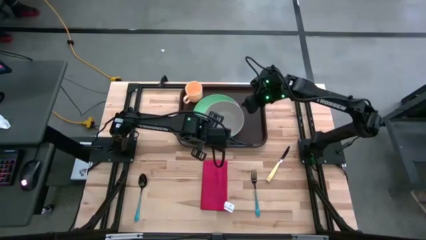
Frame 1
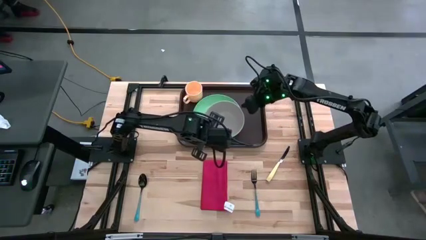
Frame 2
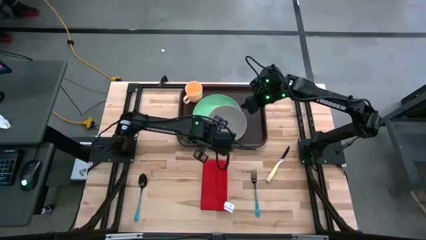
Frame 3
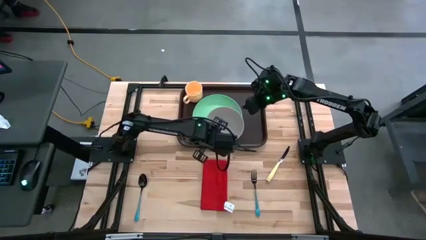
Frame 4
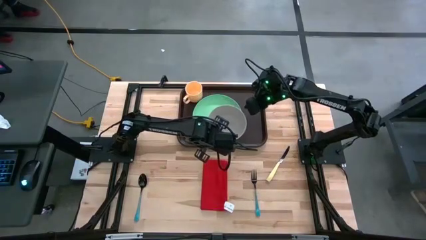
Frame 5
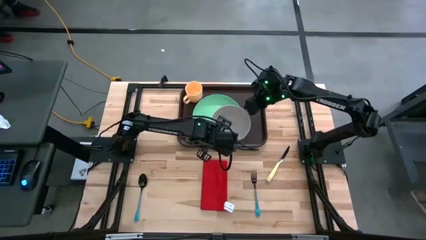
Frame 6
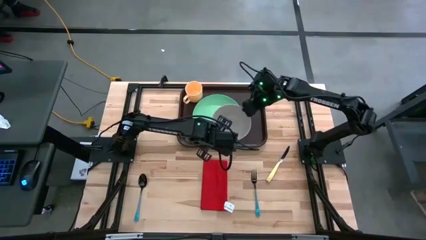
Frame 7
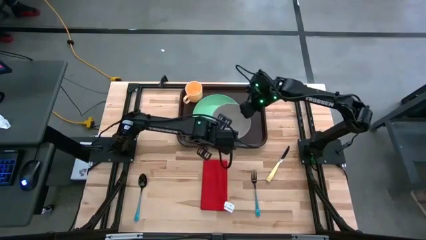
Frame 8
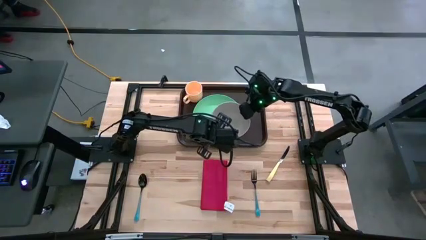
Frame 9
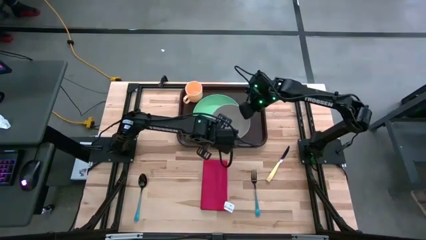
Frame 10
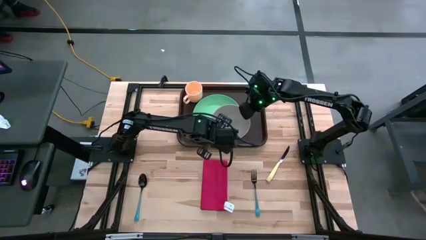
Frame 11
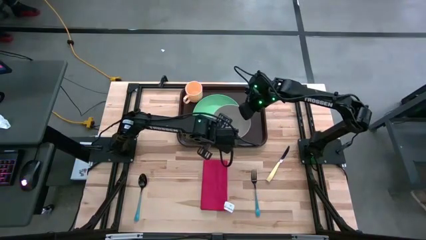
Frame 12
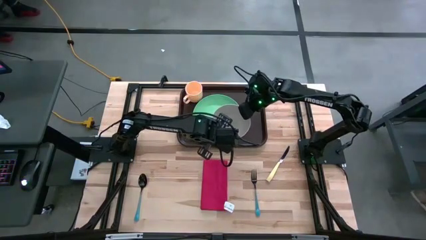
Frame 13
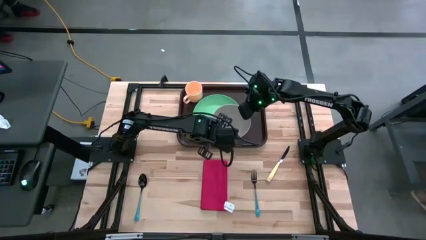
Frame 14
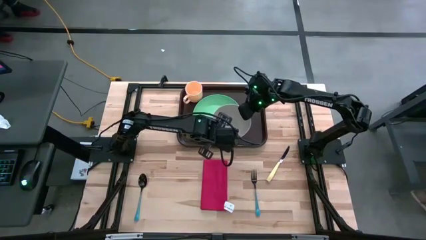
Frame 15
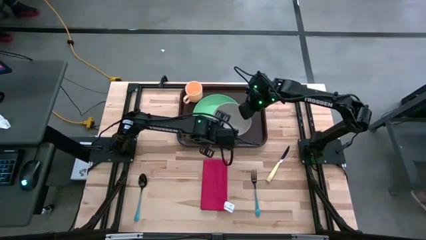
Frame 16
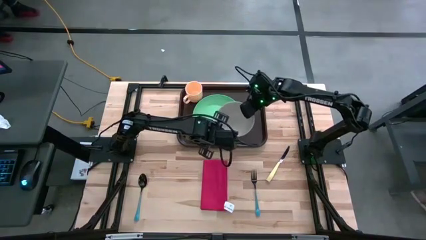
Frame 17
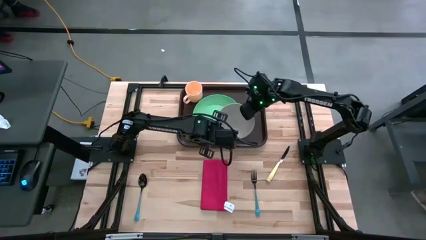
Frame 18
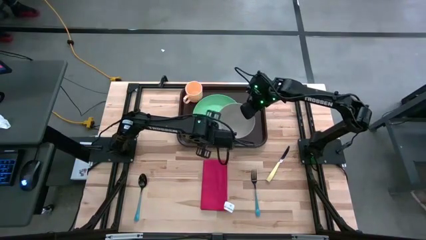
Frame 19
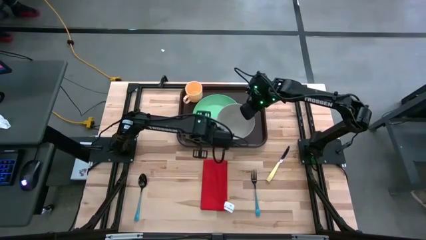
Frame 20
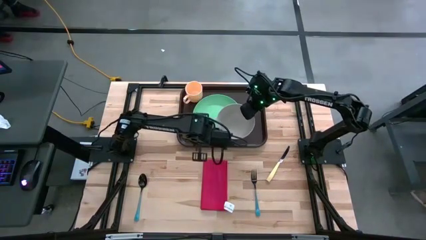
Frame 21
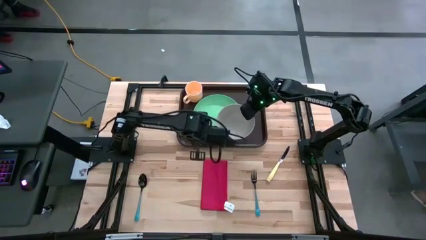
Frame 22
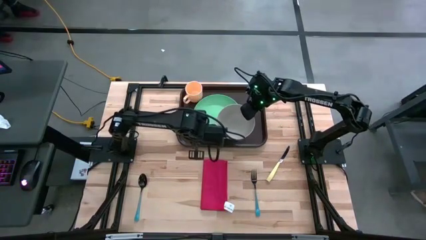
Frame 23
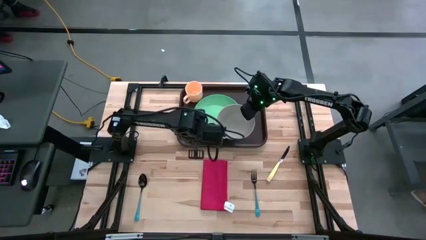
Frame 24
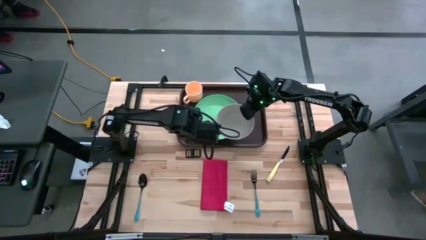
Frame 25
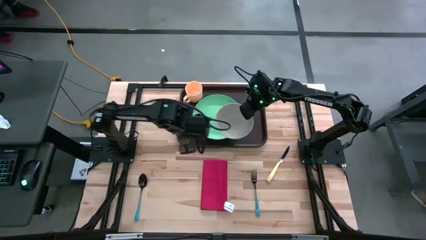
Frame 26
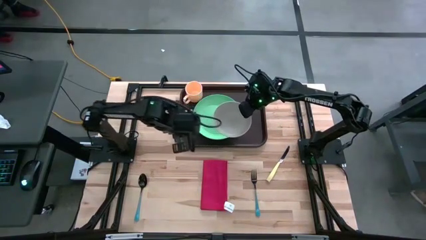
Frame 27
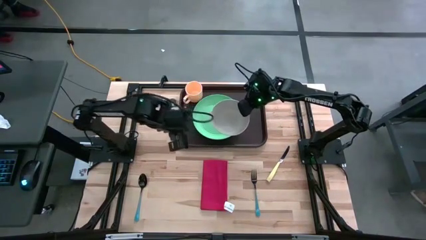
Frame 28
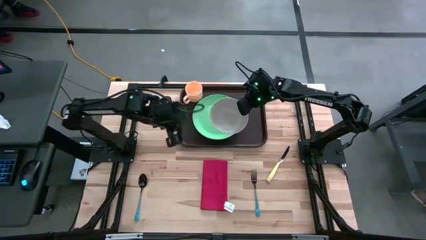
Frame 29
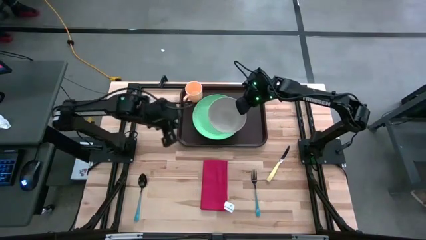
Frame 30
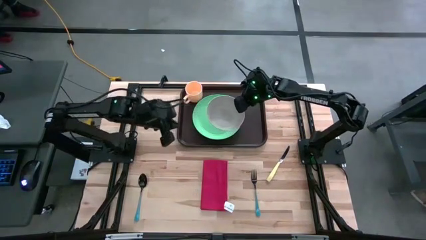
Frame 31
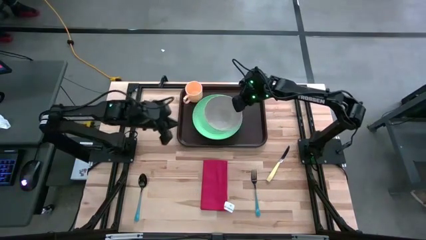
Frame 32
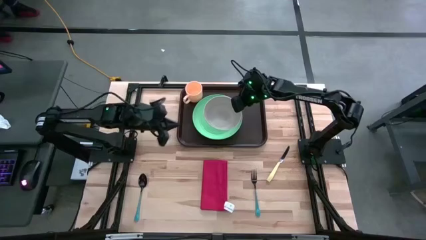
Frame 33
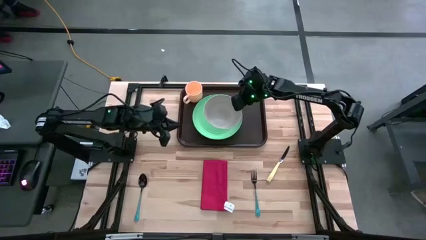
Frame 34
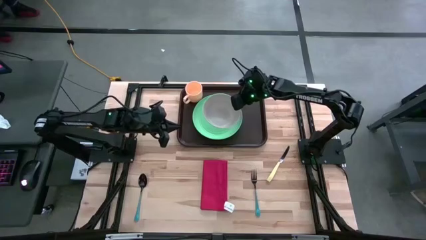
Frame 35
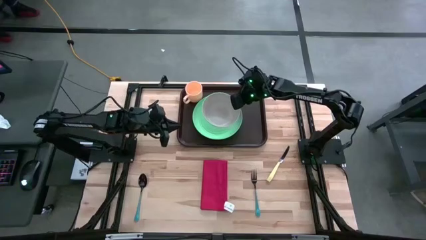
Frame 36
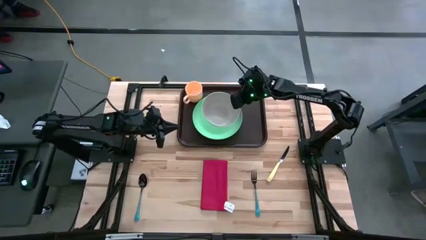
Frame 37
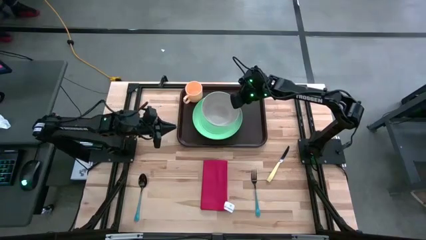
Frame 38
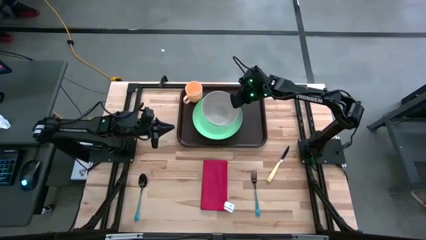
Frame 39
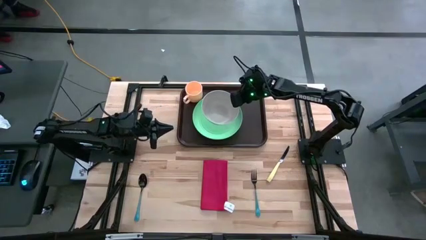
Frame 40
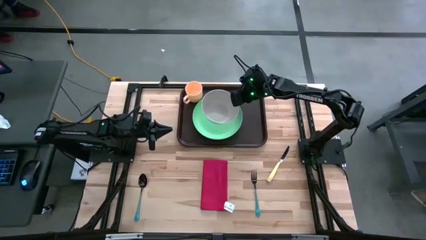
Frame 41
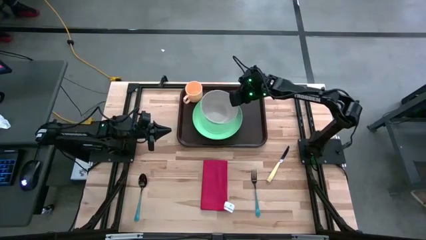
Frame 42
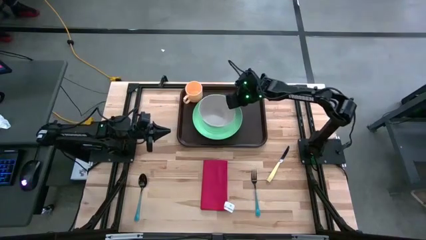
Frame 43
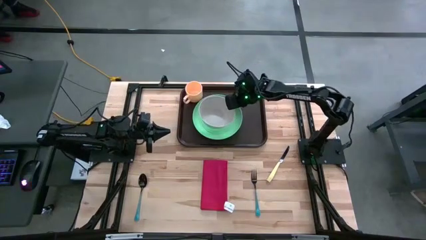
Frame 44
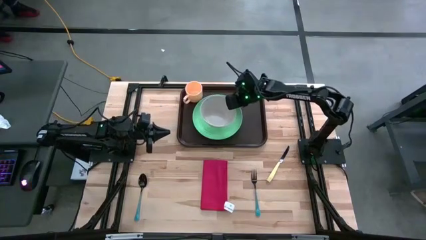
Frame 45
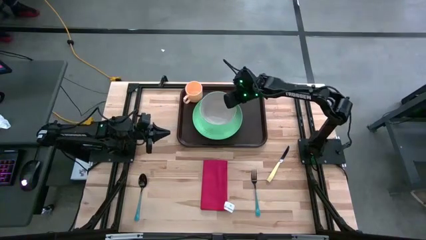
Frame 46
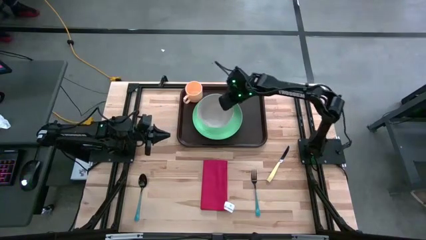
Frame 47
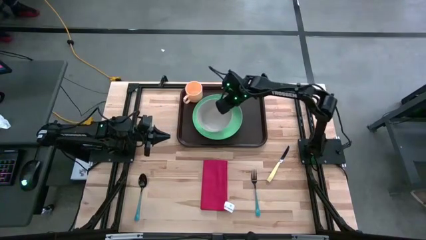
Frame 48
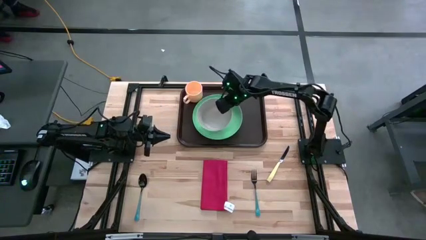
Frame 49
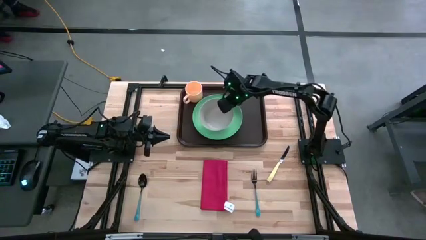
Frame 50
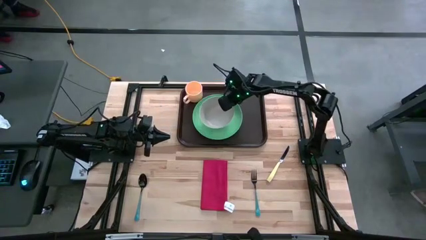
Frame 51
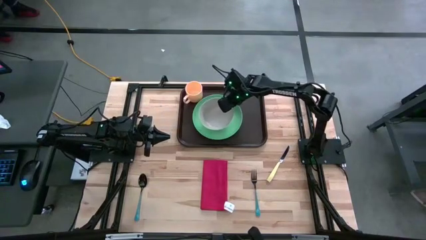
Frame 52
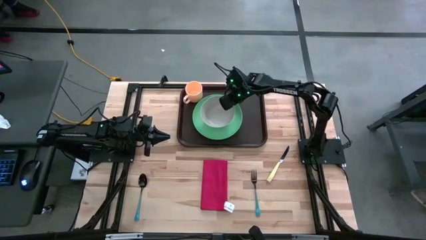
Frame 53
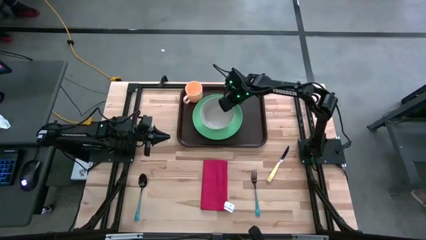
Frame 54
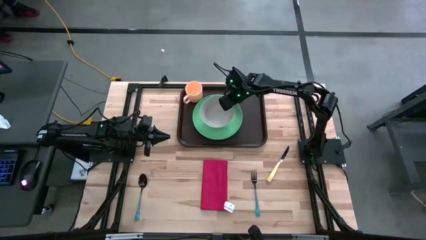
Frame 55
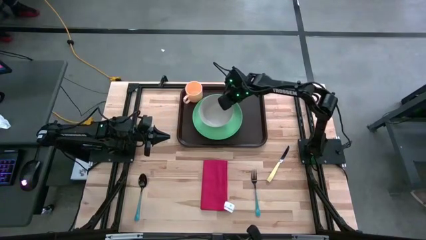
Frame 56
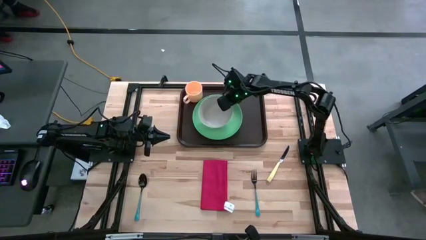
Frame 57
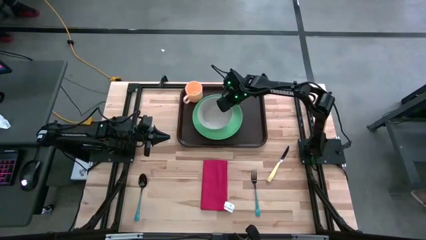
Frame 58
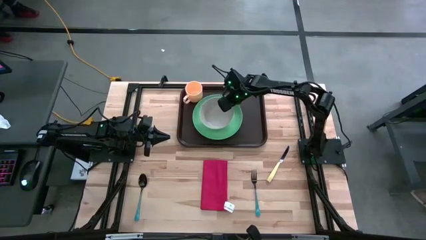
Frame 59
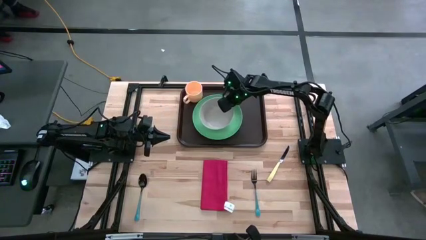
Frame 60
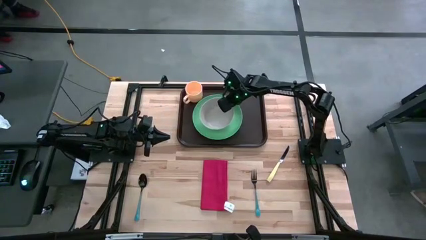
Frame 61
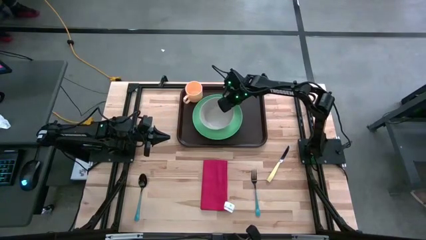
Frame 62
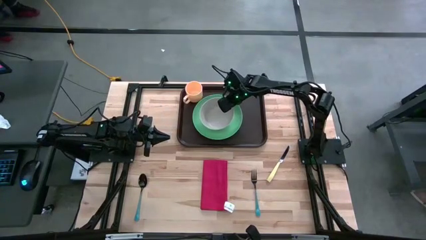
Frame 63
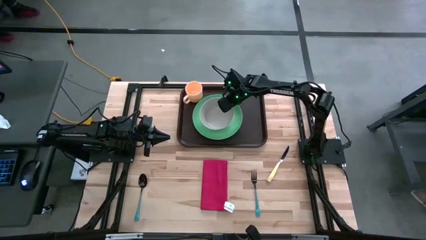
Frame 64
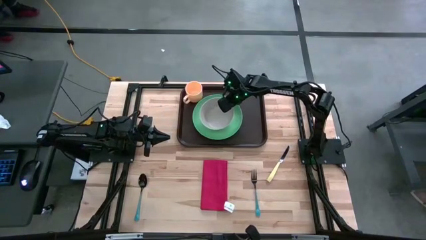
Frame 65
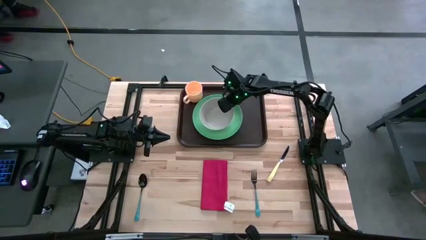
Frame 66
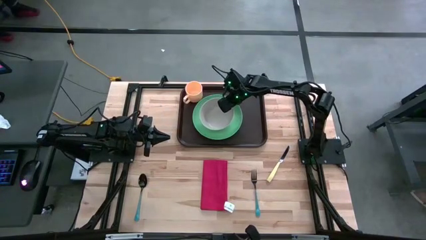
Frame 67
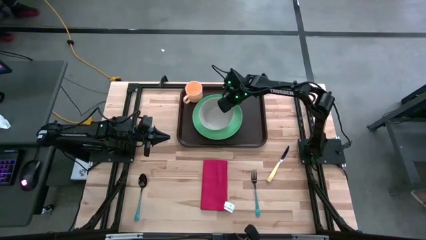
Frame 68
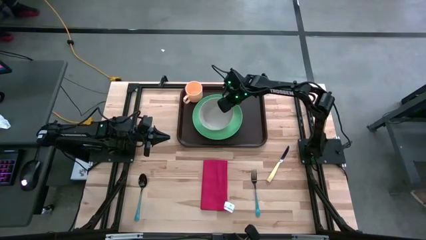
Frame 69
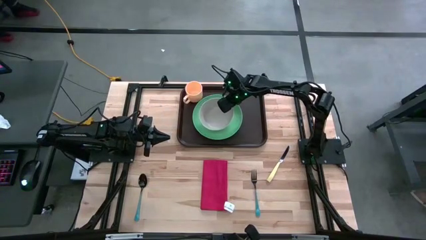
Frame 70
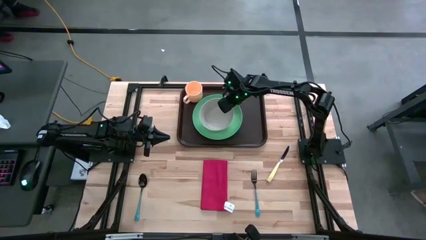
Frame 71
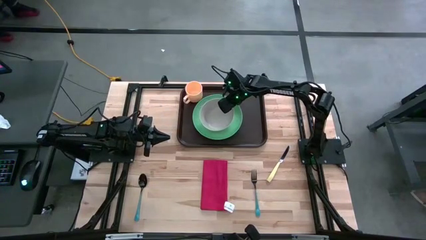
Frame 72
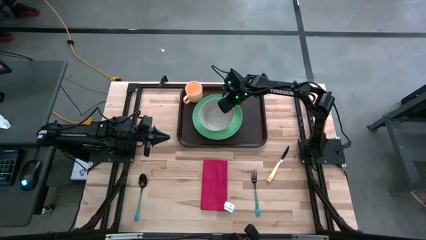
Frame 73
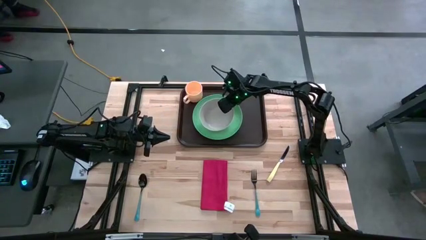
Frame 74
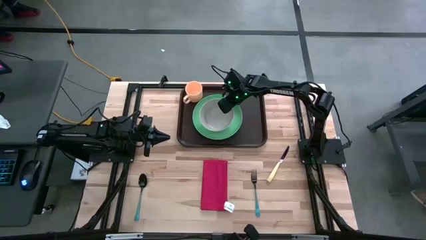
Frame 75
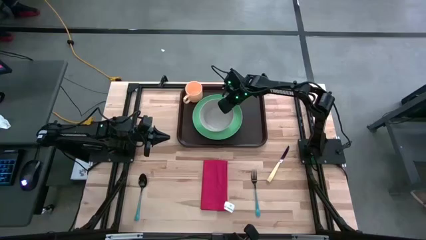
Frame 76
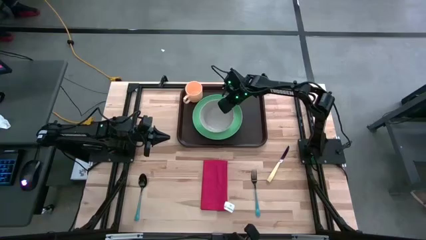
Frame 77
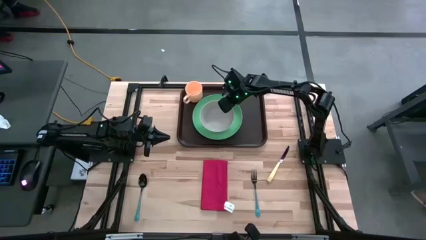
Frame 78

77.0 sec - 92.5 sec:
Task: Set up tray
Put the gray bowl on top of the green plate to the bottom of the yellow mug

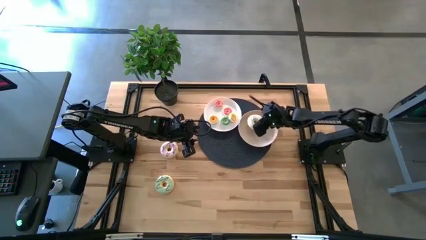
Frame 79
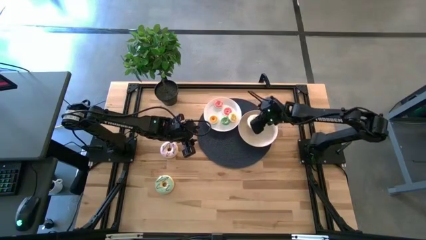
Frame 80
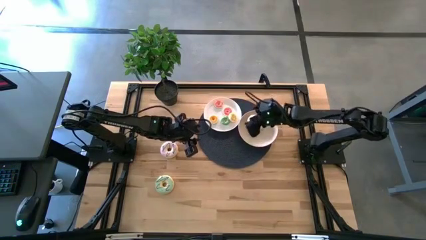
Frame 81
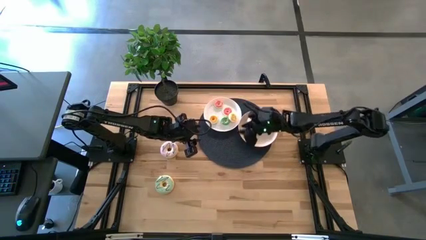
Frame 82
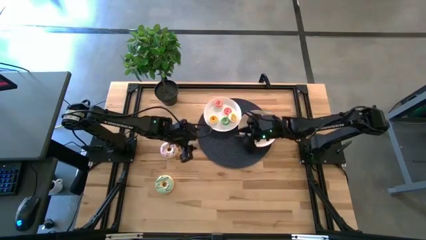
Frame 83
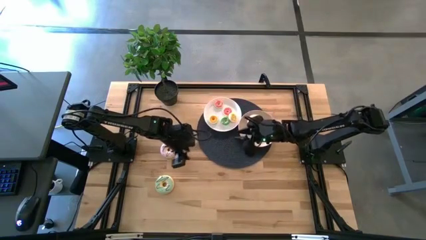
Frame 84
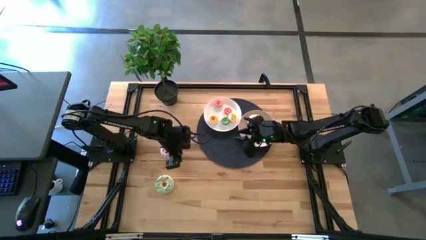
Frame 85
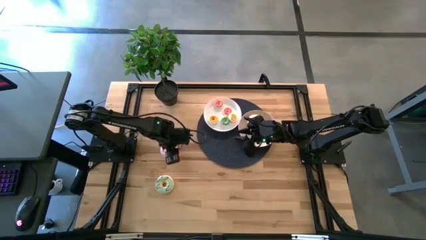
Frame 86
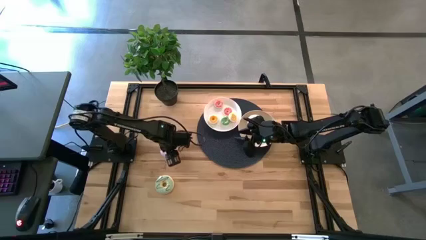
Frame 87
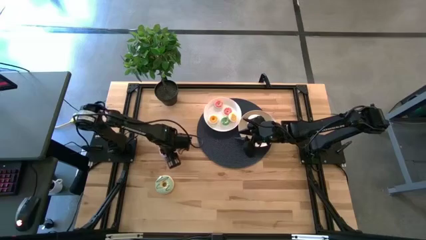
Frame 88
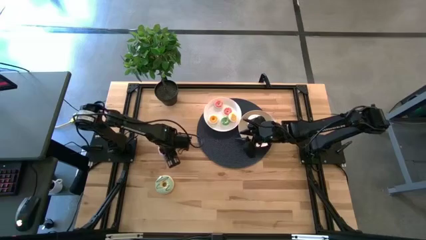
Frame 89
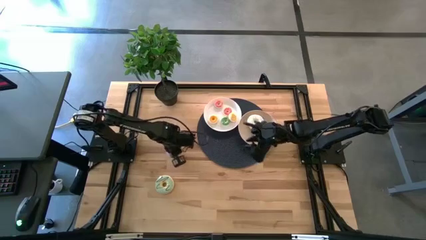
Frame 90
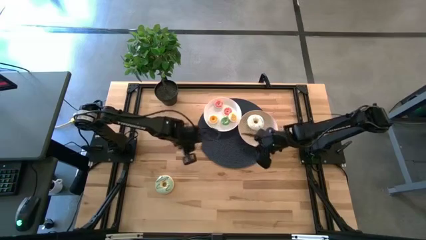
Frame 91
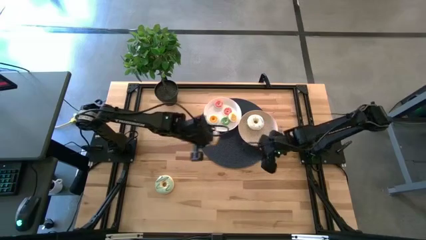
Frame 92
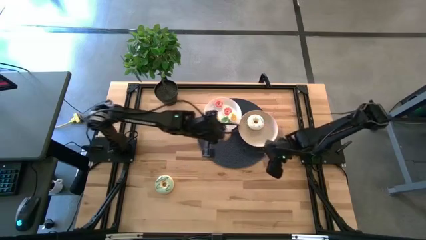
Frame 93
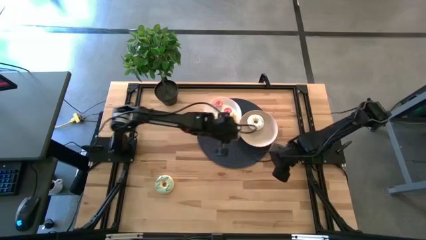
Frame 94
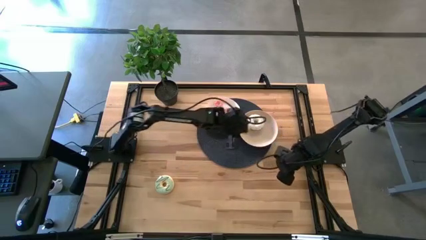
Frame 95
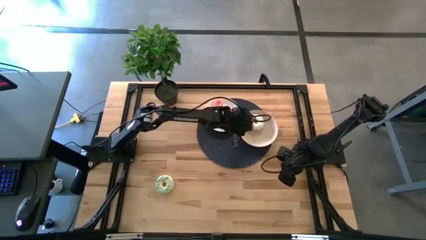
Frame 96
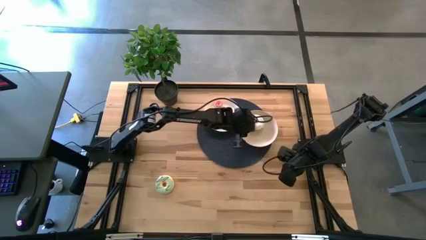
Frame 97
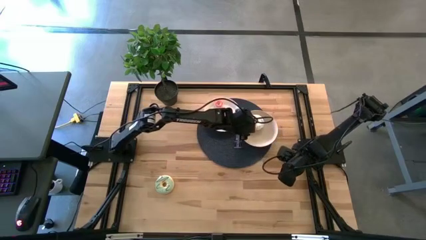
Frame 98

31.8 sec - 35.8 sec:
Task: Pick & Place donuts
Put the large purple donut on the gray plate
